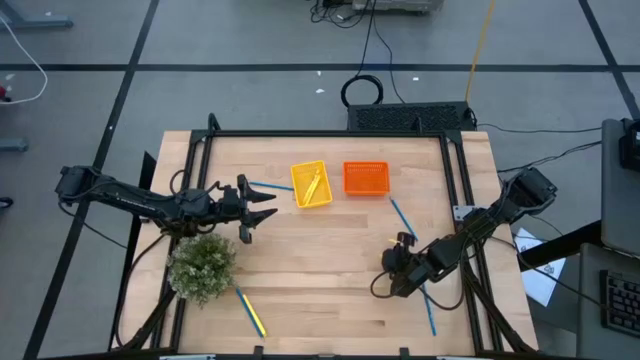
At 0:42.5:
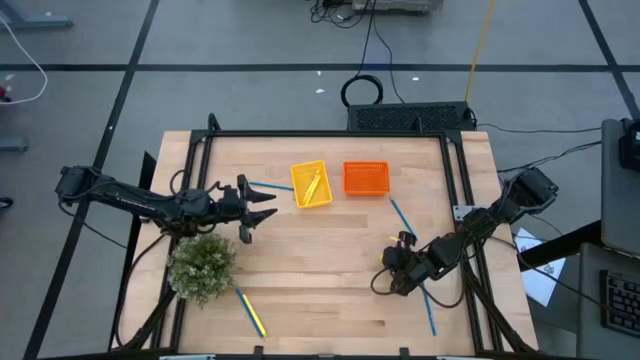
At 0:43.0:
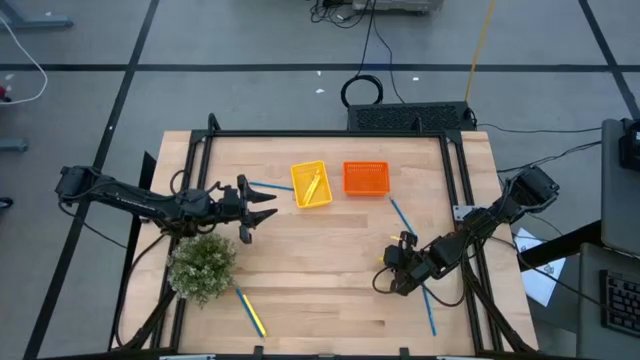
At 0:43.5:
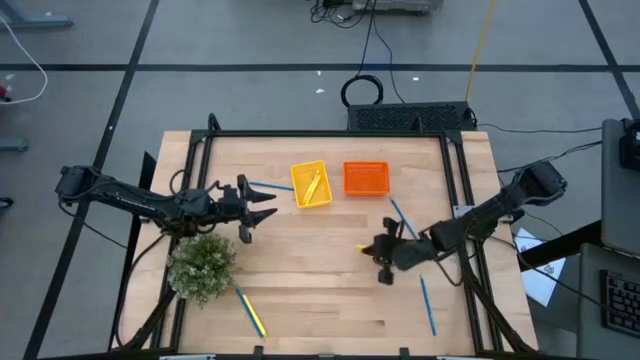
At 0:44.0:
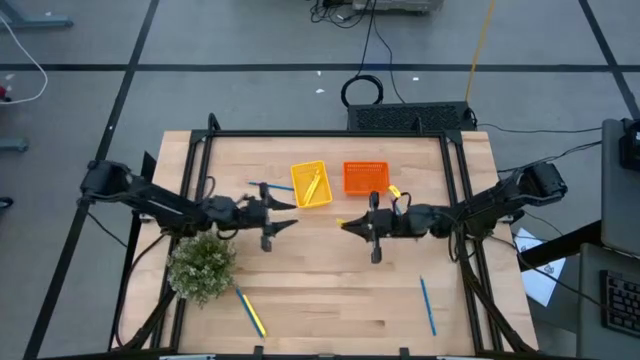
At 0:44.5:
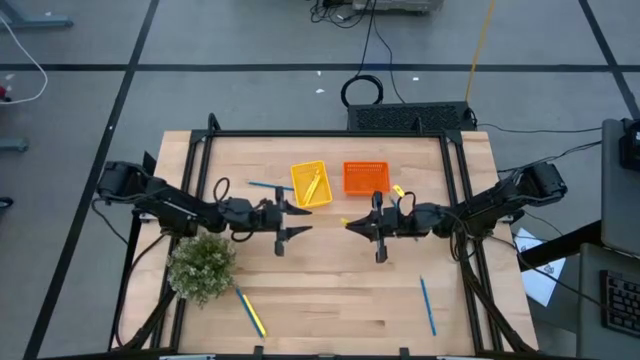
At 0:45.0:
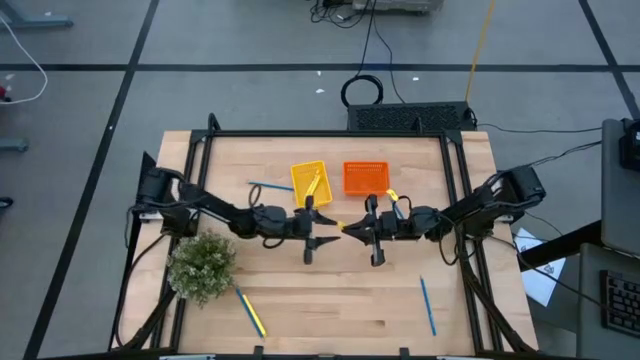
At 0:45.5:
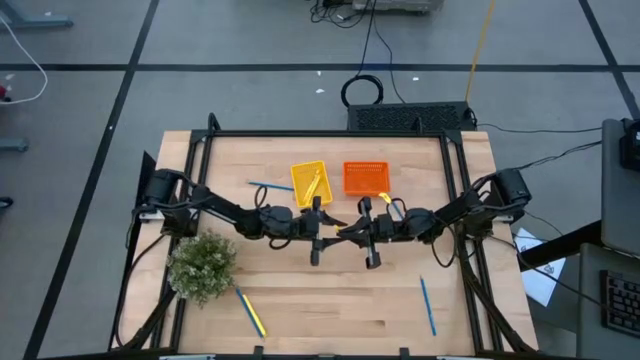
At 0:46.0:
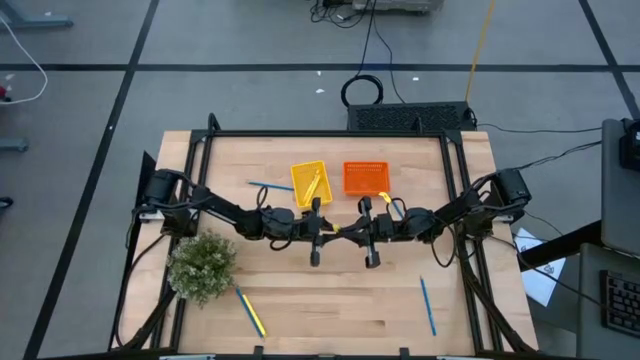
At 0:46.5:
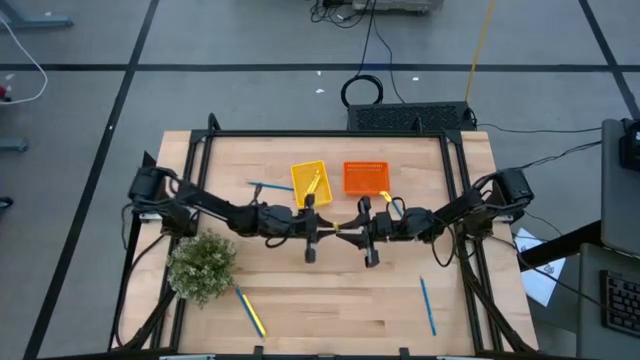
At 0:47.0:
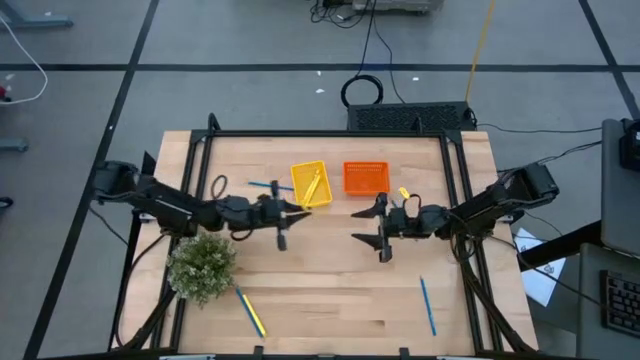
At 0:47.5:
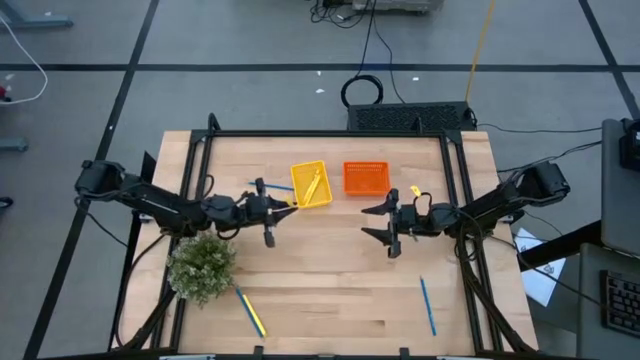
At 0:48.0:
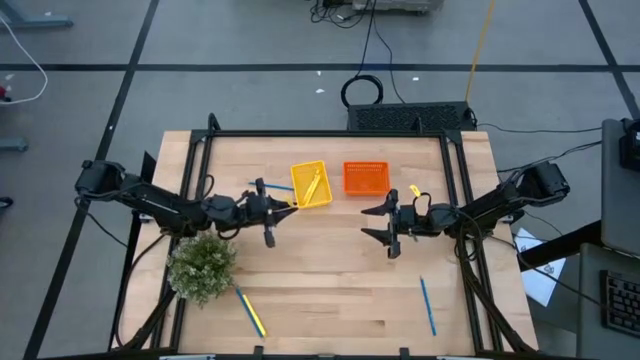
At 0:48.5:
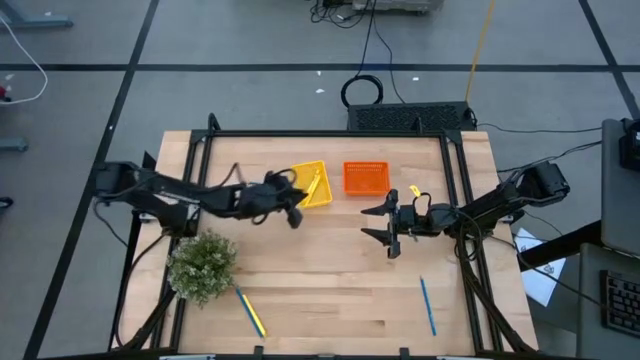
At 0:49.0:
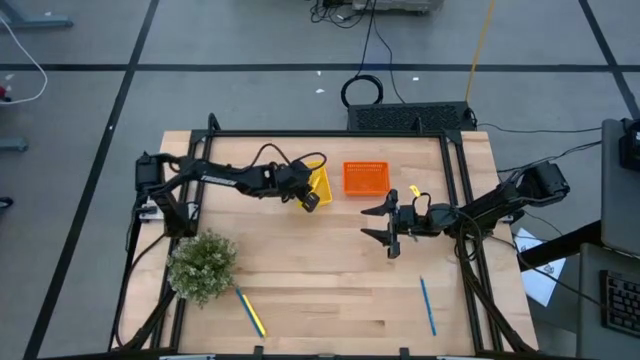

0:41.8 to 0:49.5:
Task: Sort pens & pencils
Put the right yellow pen into the yellow basket

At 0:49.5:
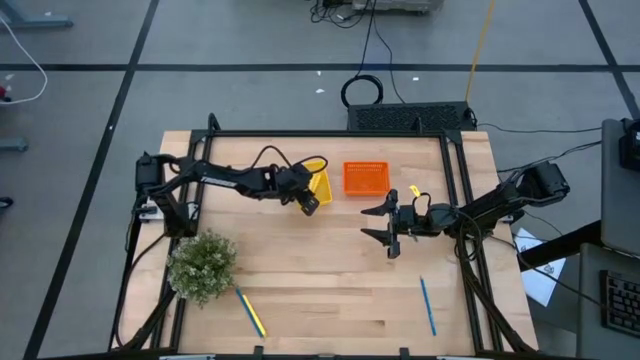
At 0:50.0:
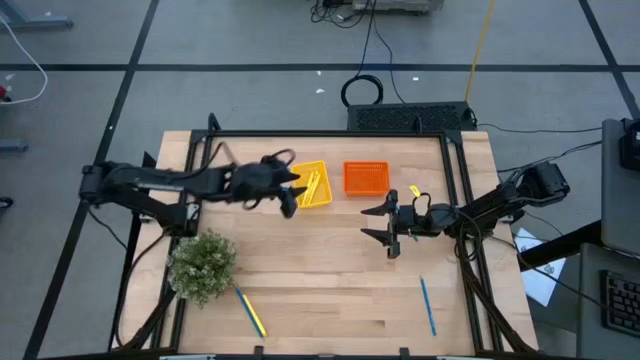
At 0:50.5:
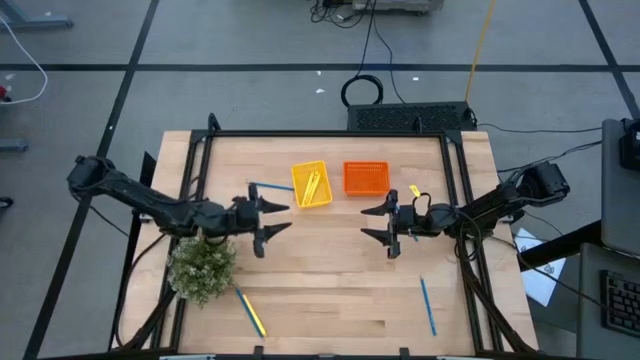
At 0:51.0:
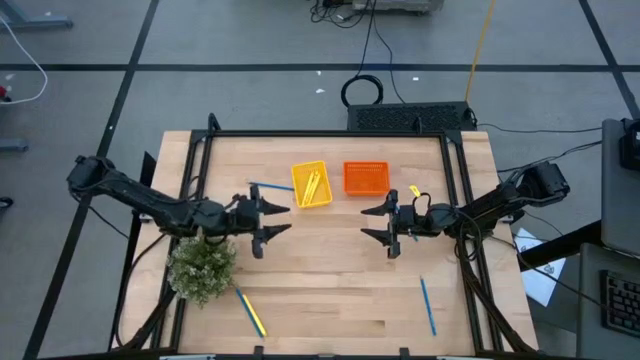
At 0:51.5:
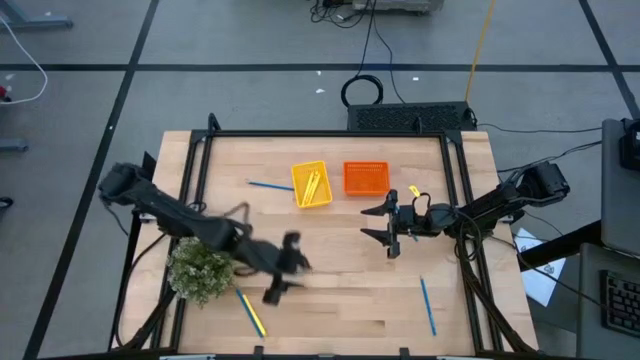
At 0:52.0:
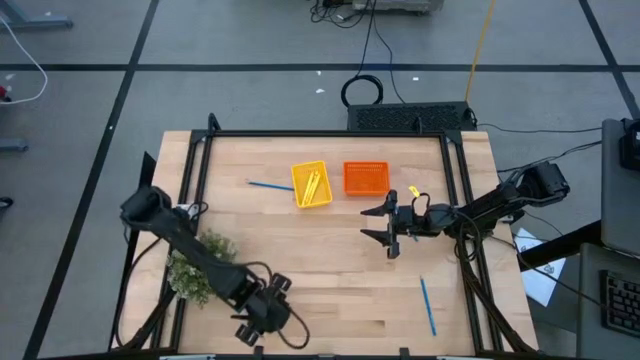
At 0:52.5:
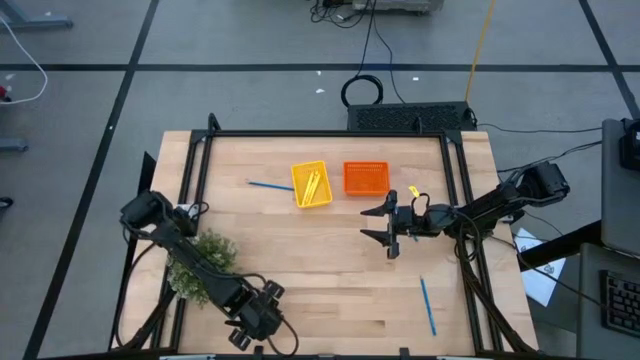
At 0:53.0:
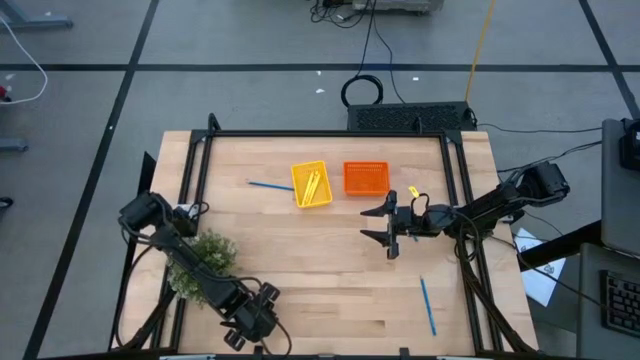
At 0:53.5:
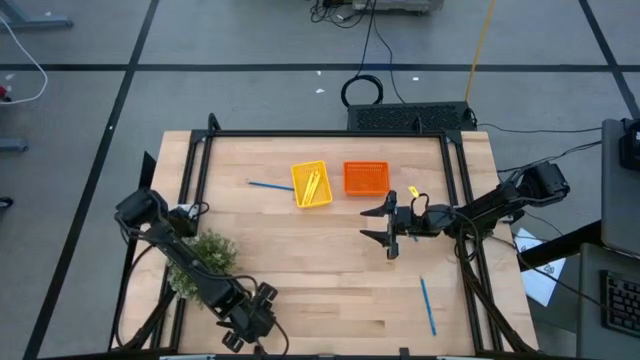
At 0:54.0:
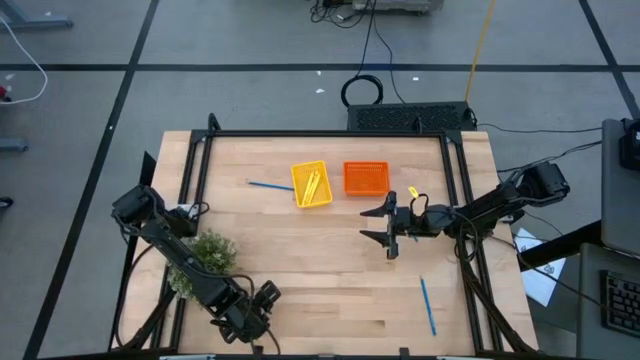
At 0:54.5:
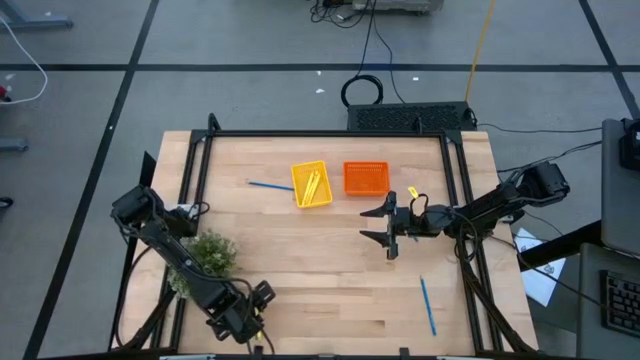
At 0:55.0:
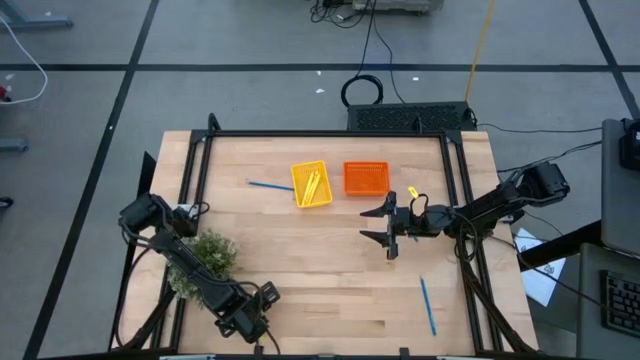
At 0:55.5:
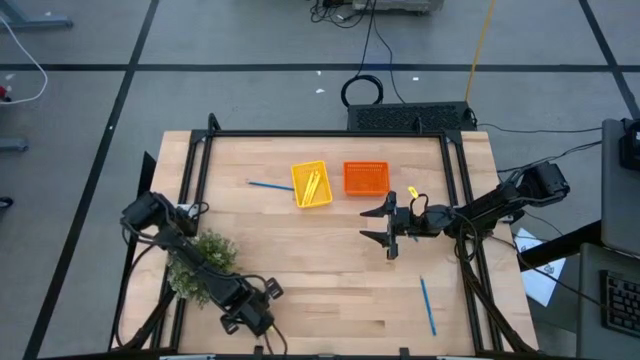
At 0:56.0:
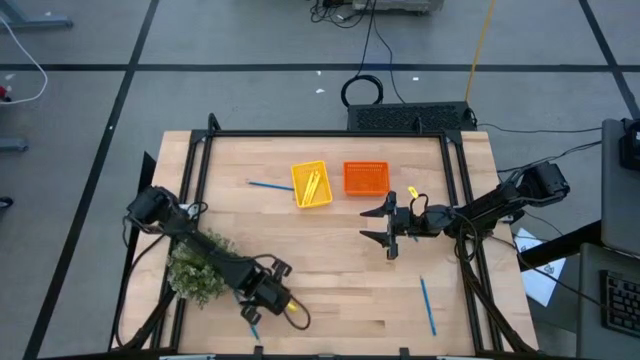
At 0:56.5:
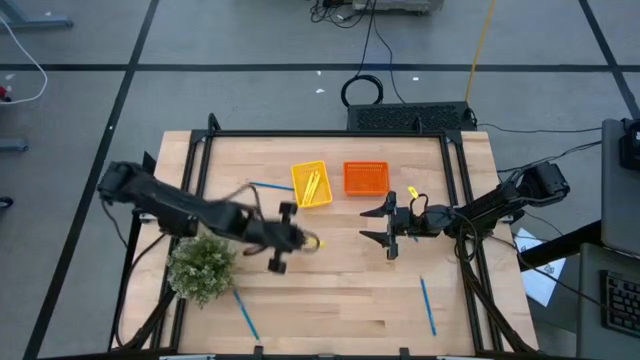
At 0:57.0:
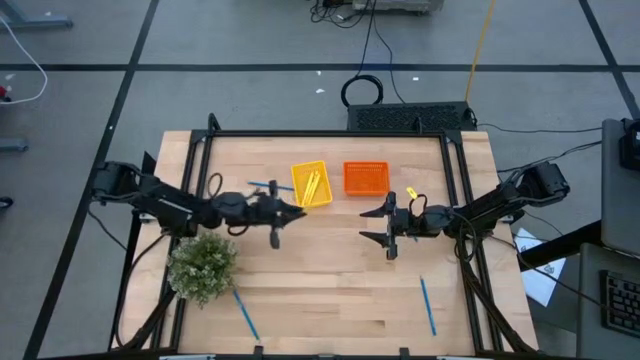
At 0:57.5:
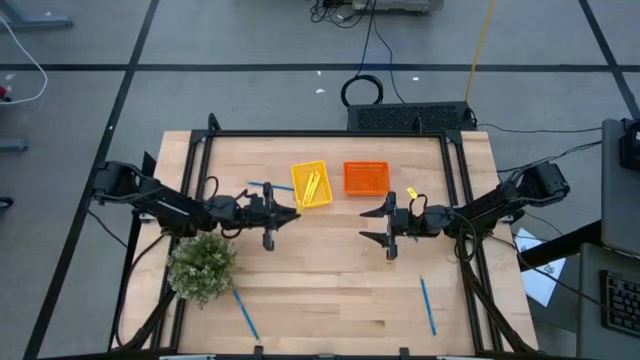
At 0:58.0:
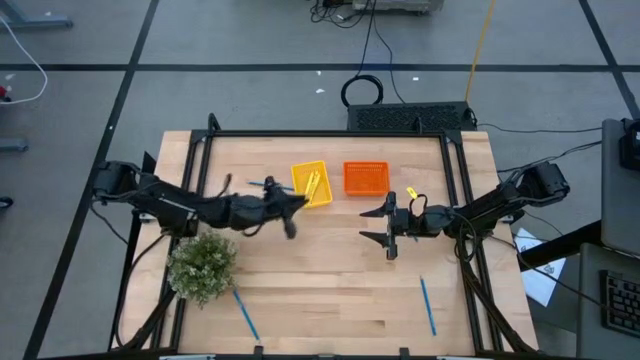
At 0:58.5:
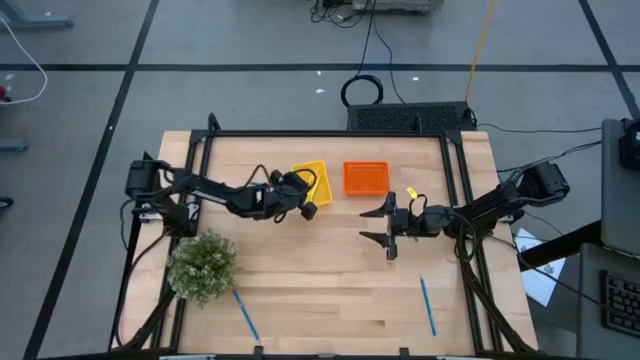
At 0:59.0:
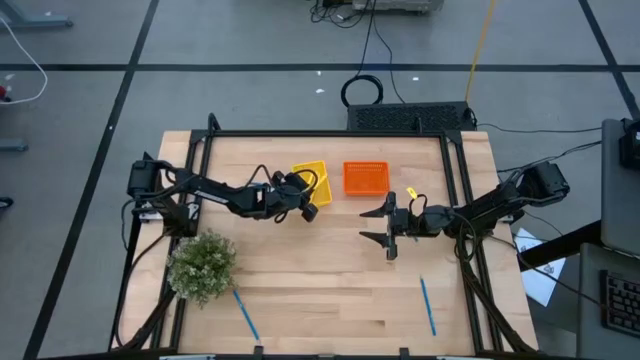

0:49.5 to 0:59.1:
Put the yellow pen into the yellow basket

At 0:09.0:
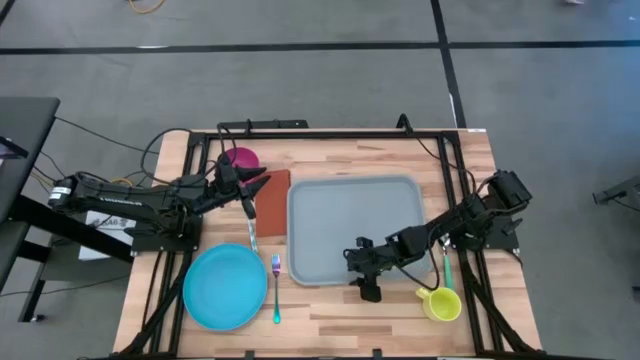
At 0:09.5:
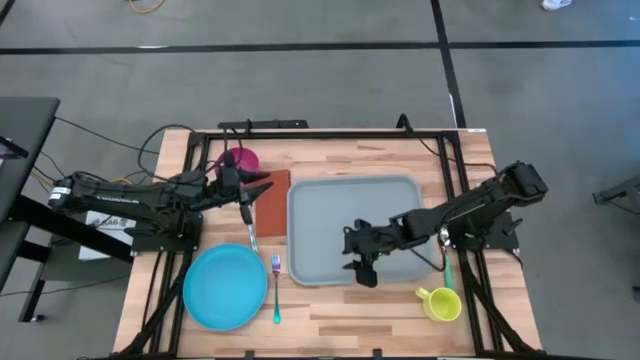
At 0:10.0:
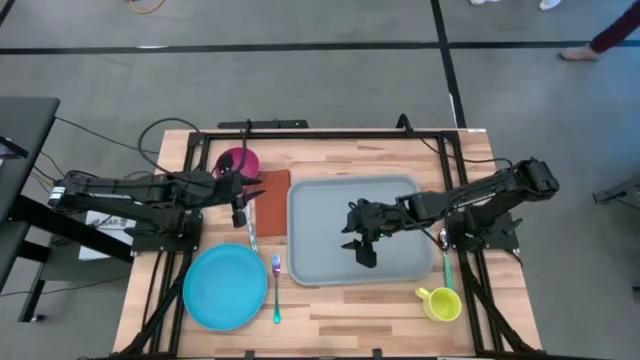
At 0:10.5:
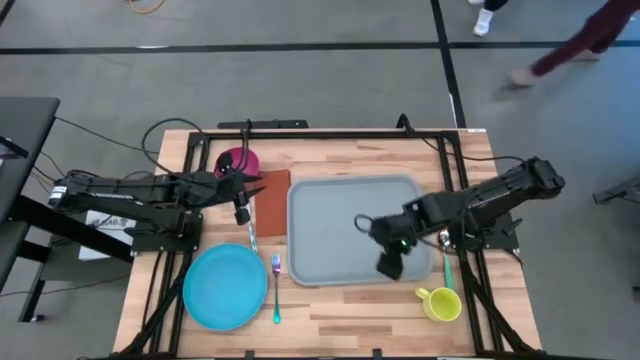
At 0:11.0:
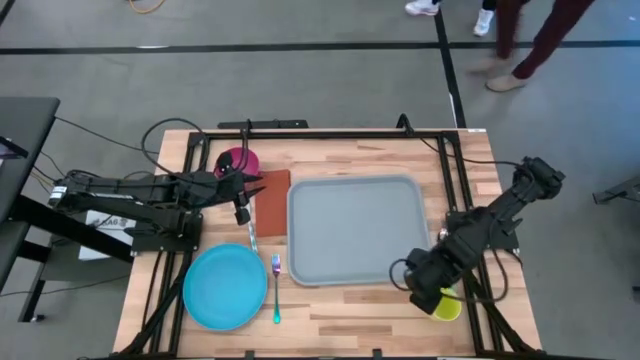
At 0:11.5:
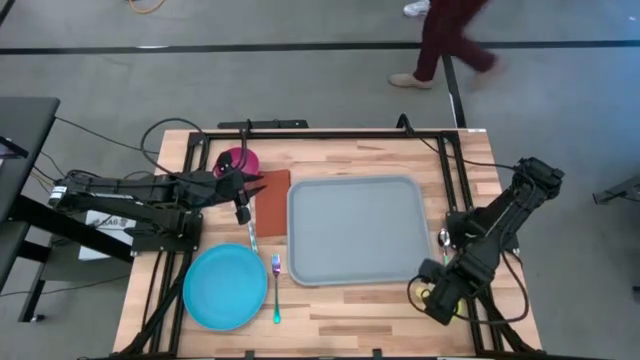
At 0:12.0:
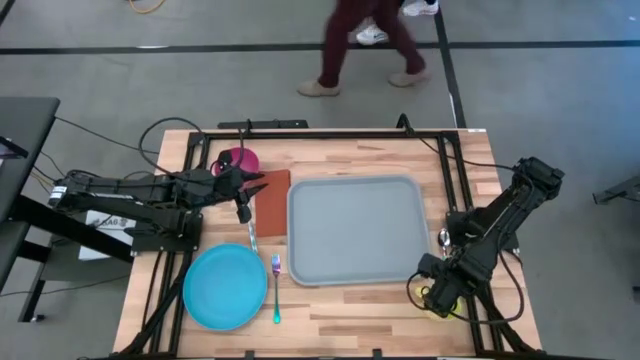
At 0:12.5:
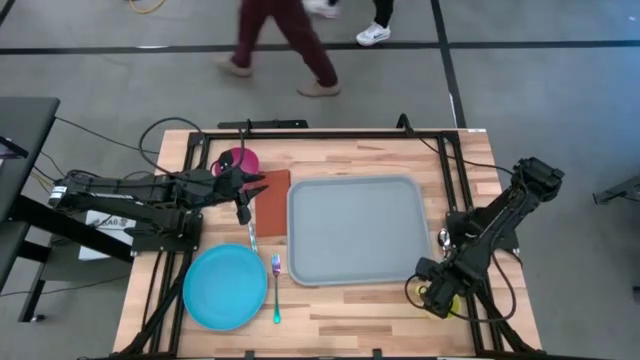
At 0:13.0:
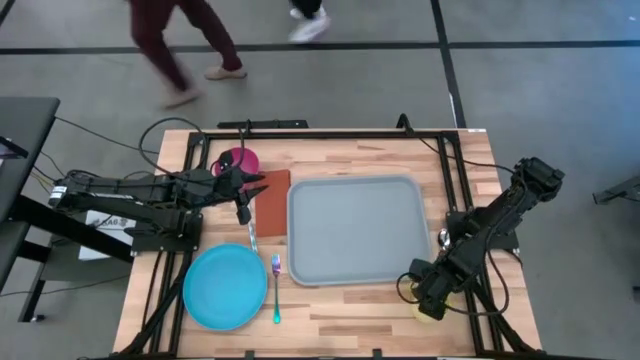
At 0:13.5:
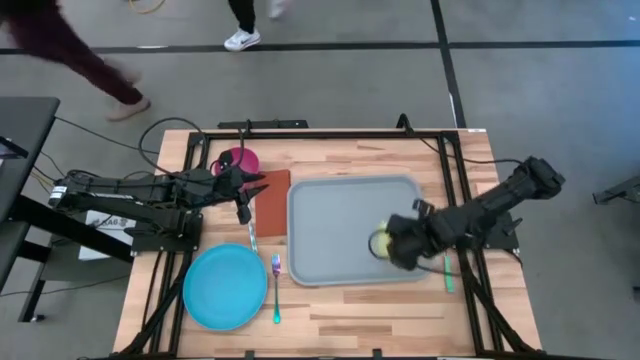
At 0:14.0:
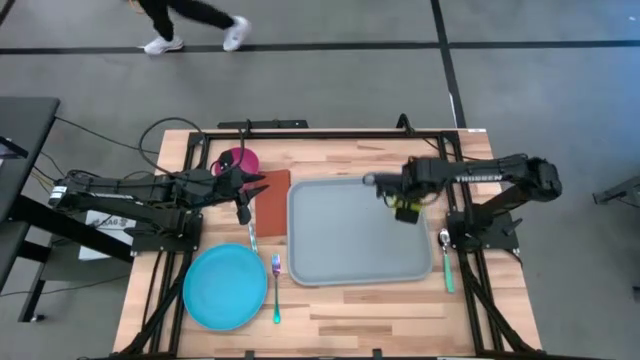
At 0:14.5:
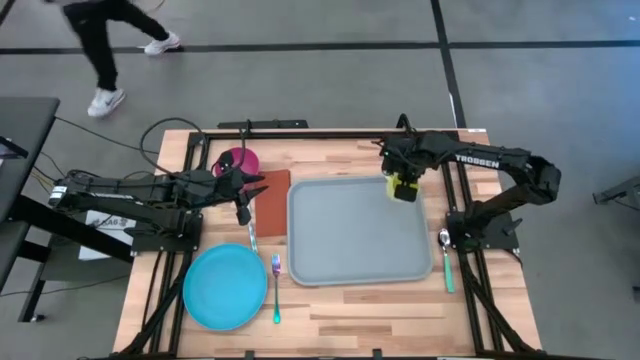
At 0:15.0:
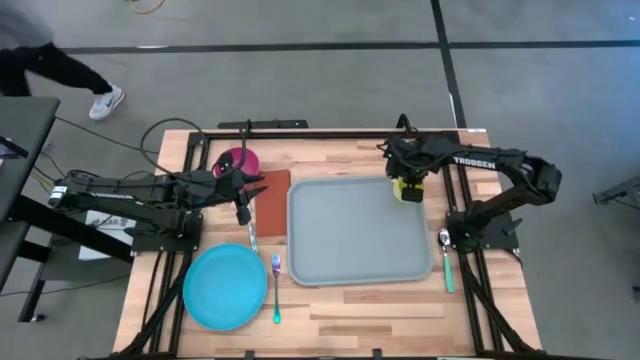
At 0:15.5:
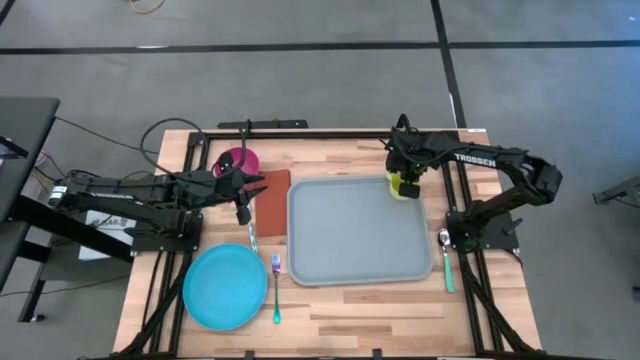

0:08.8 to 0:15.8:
Task: Set up tray
Put the yellow mug on the top right of the gray serving tray
